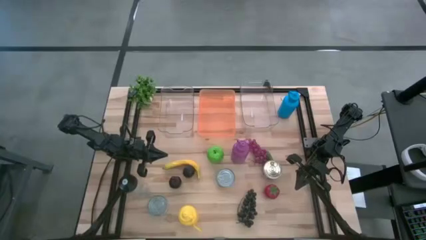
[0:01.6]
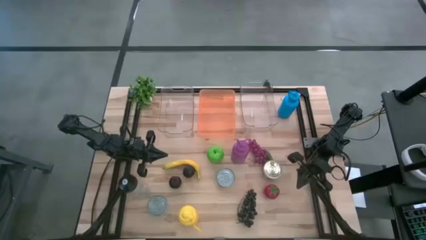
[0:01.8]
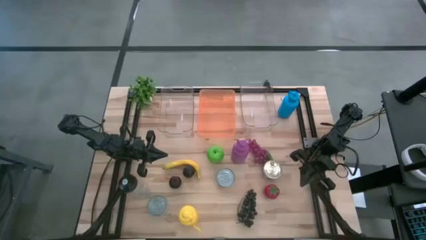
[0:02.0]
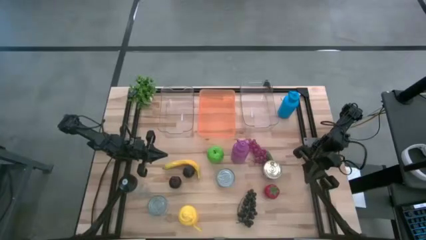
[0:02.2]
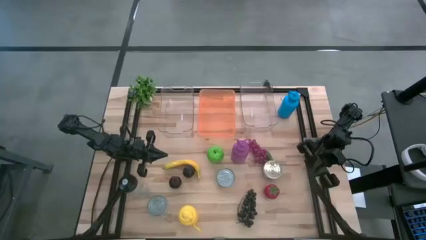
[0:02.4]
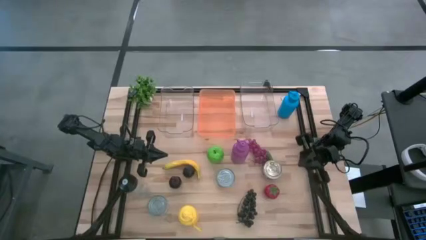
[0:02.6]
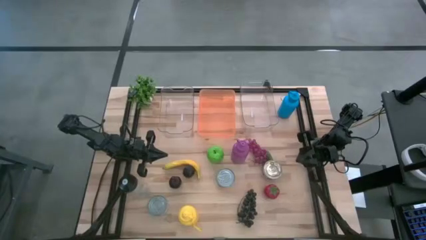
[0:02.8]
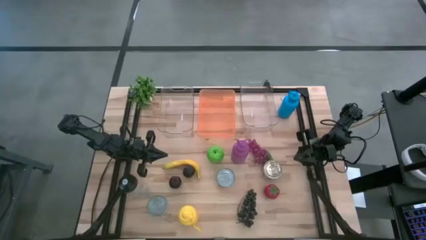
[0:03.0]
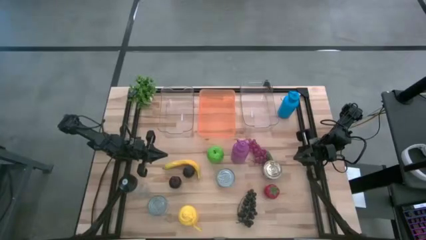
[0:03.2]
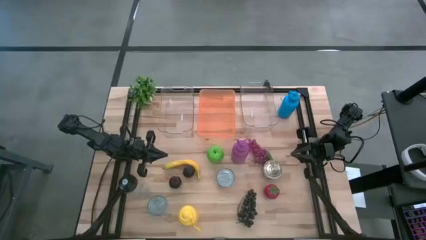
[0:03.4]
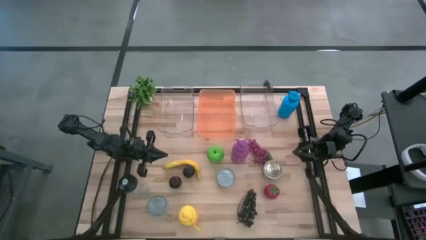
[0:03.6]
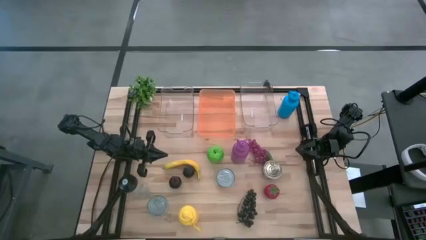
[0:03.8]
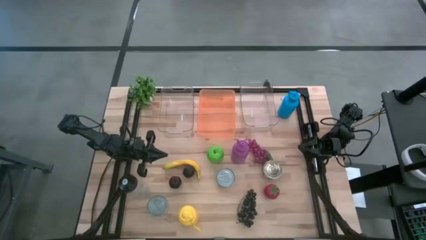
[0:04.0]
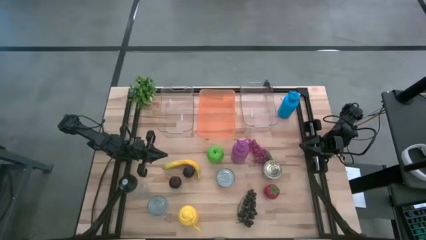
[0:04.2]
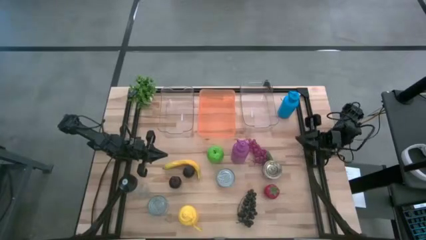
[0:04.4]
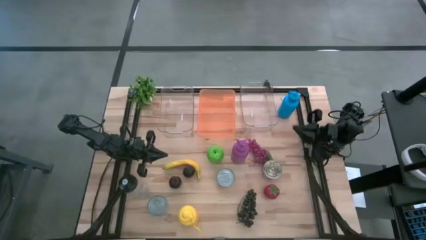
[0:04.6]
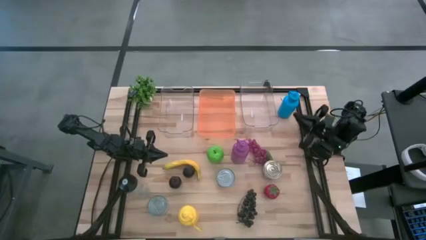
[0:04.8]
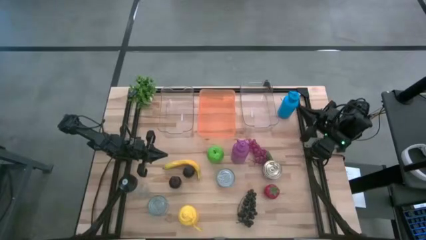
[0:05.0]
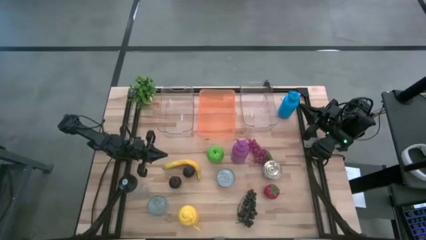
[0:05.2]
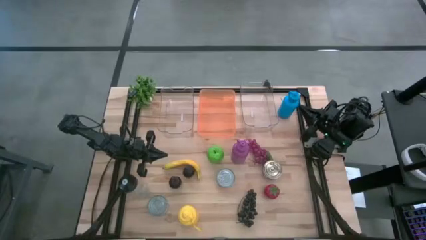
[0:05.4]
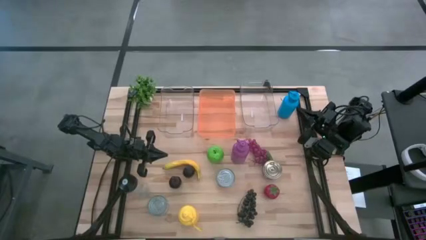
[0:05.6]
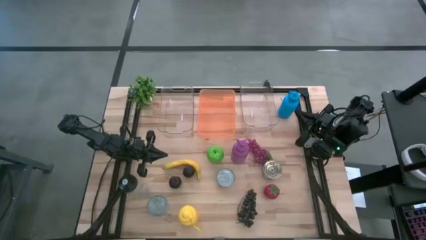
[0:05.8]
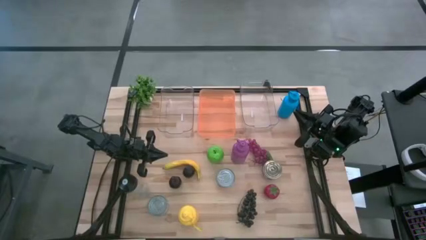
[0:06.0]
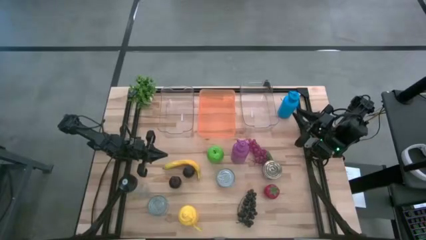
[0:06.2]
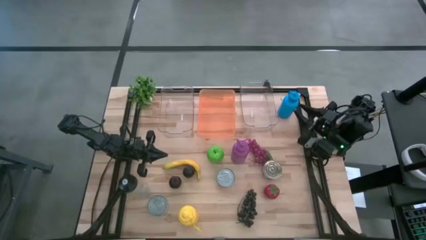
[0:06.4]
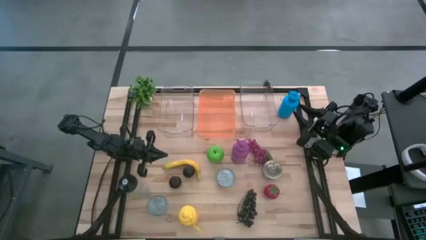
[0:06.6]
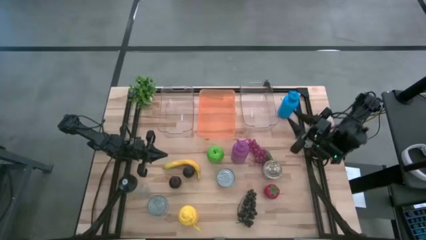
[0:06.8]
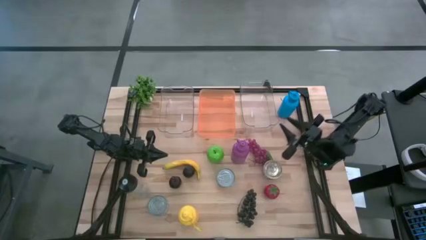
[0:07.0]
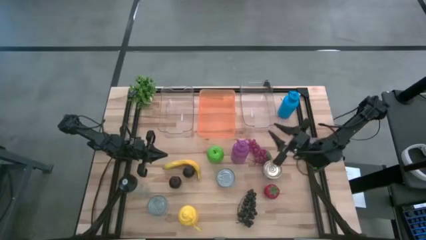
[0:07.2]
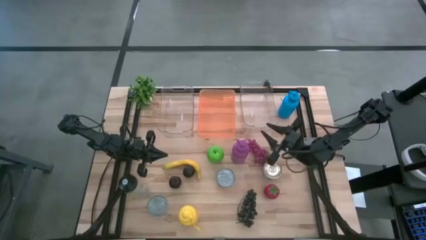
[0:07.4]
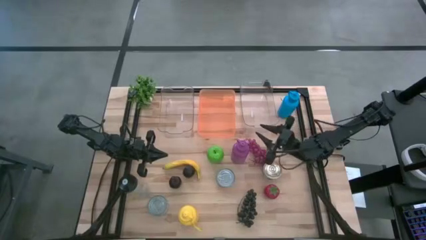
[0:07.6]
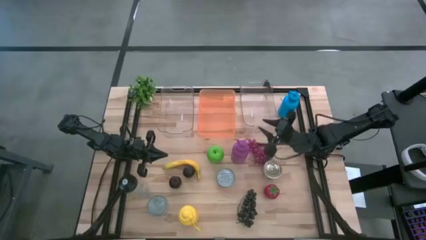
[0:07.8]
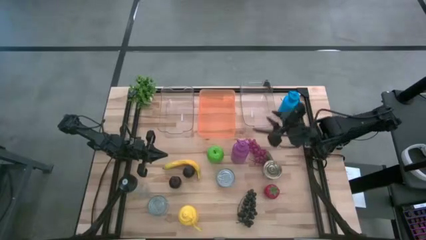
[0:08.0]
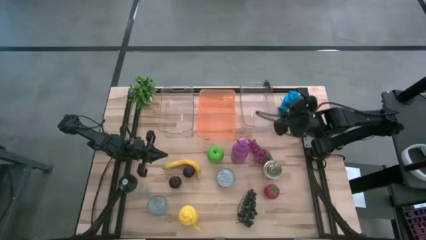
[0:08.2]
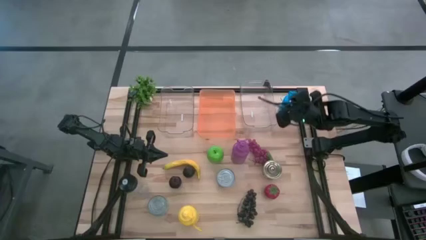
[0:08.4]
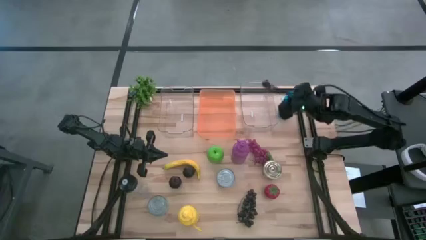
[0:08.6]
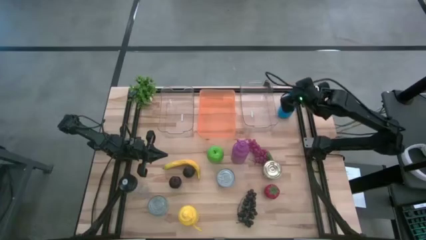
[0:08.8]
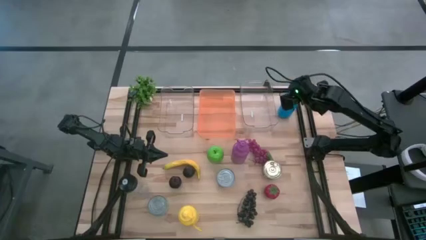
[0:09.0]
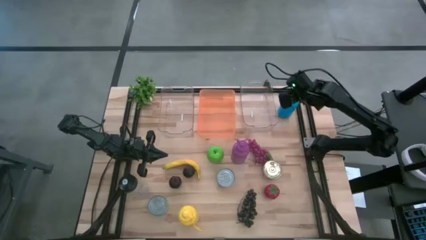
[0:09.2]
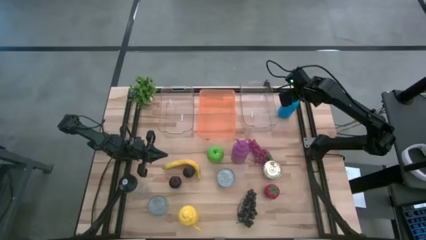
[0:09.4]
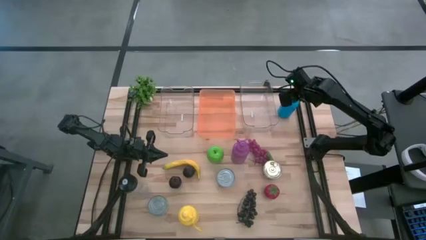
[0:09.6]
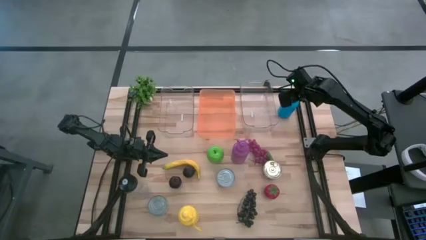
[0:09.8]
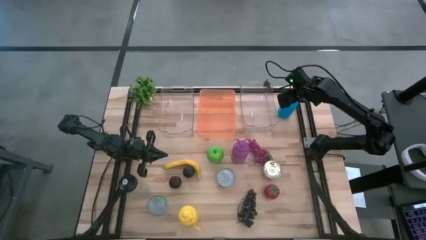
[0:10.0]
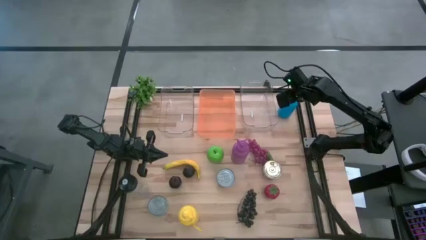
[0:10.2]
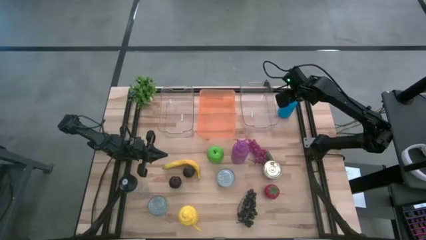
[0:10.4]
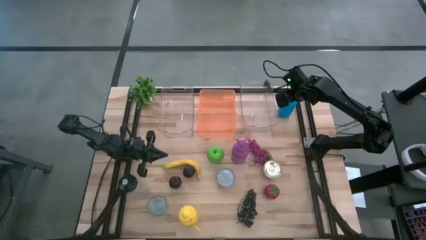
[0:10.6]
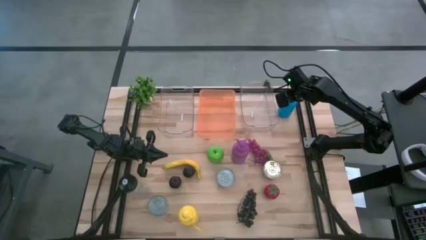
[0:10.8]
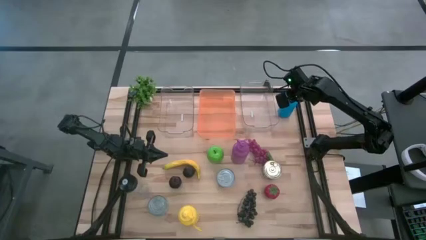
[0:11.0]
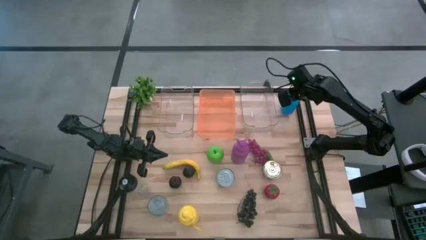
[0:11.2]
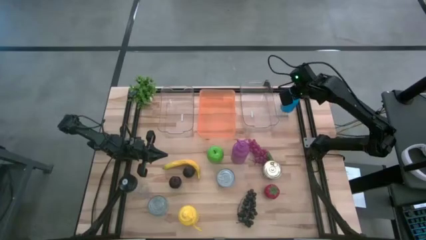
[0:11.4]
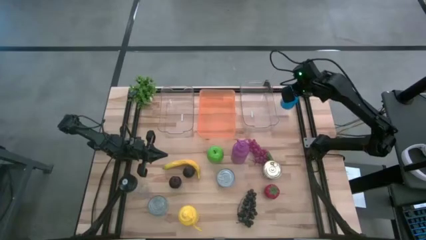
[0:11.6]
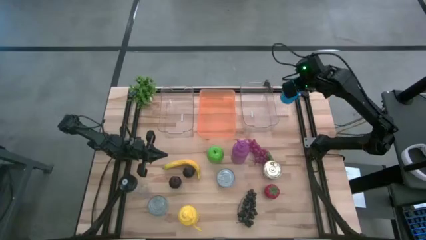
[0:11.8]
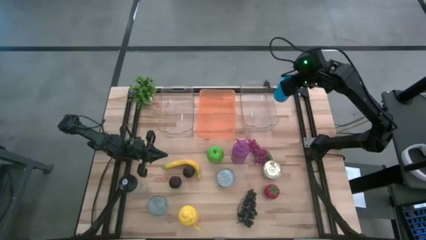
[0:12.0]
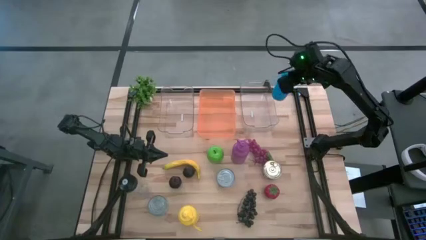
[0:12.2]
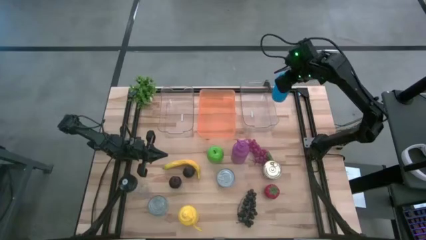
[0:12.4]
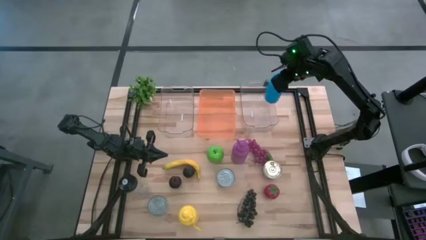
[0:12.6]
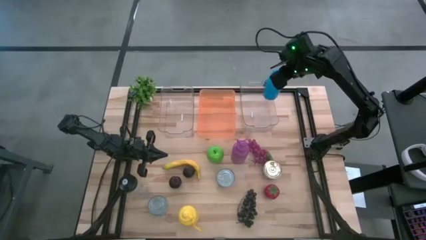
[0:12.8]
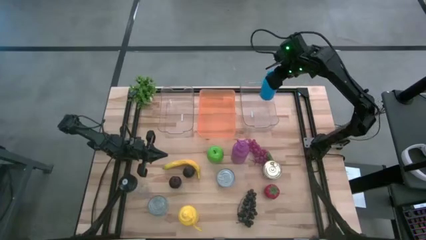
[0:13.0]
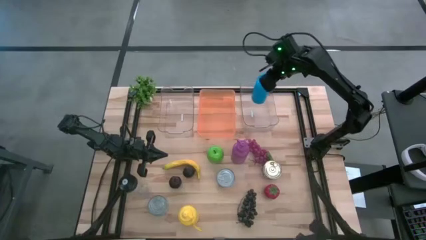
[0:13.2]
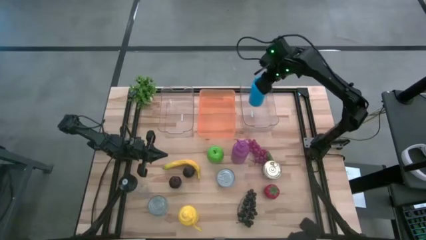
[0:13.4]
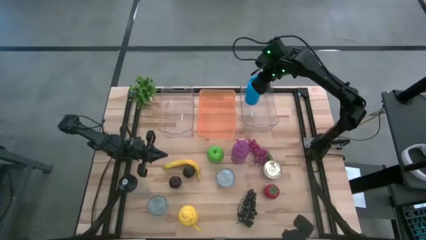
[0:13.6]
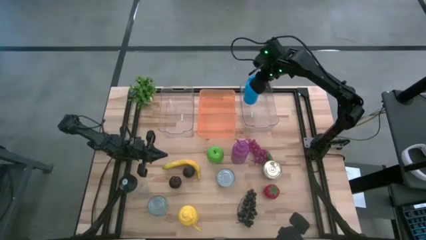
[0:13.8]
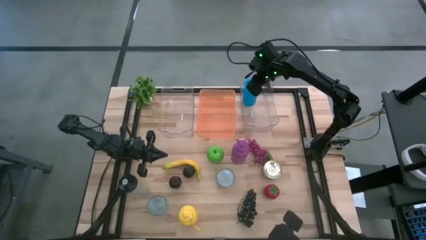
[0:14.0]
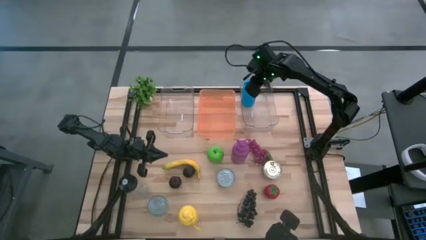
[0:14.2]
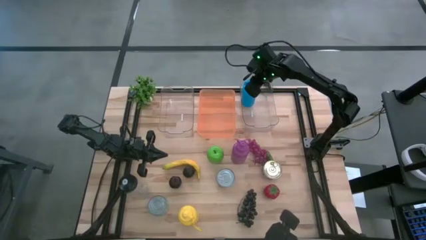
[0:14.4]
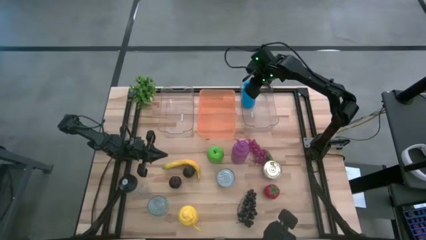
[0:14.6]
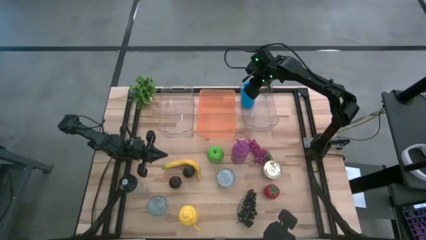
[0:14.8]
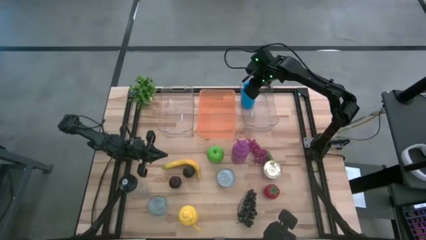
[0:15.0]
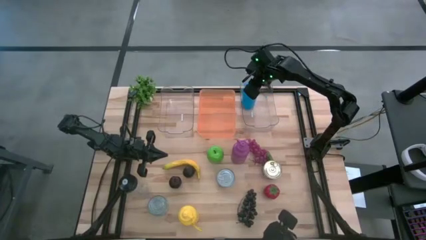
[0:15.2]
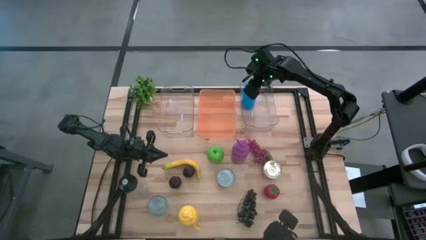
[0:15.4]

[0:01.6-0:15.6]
Task: Pick & Place Food Item
Put the blue water bottle into the right transparent bin
